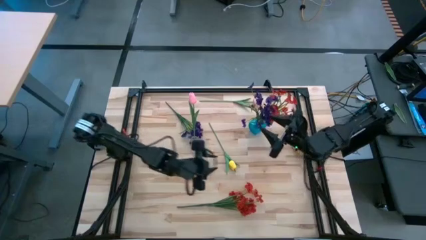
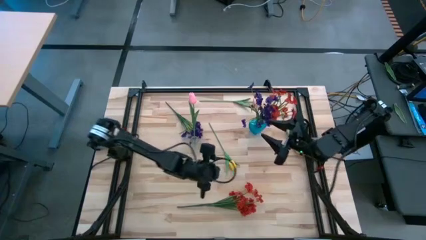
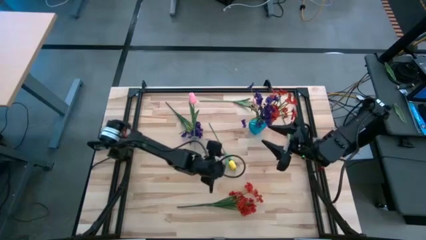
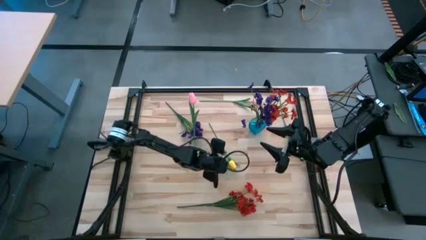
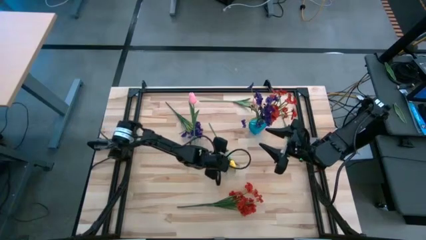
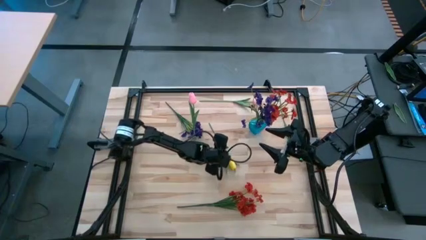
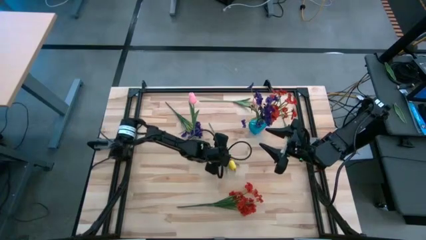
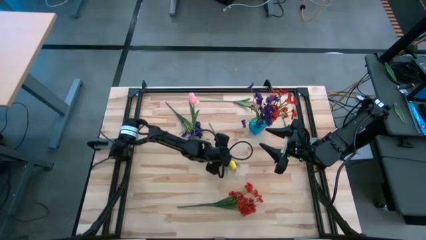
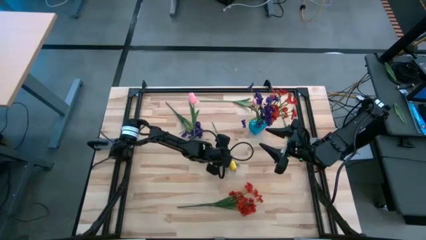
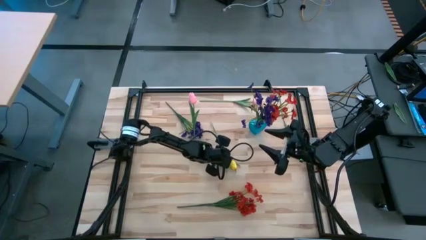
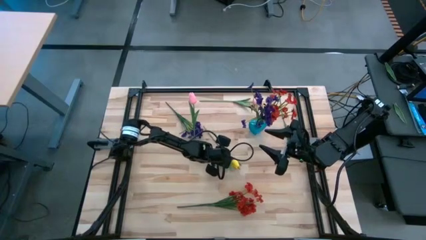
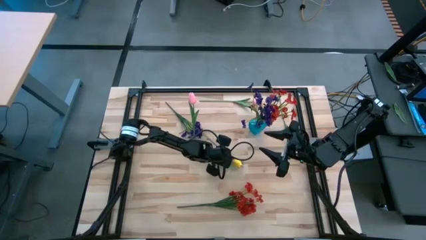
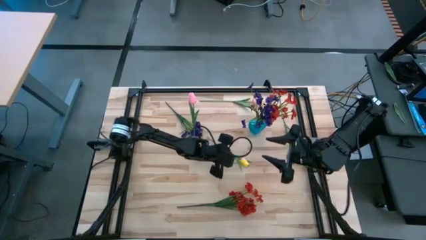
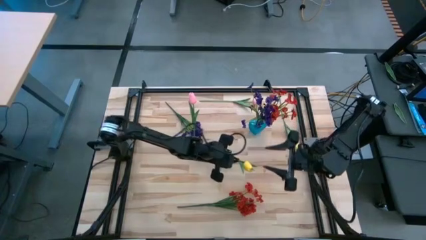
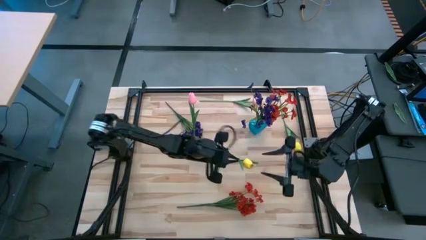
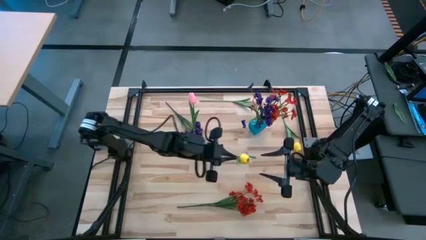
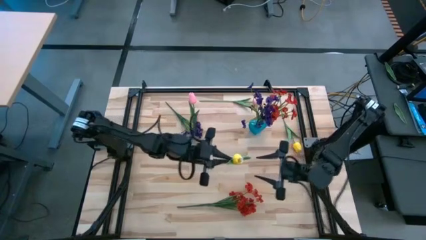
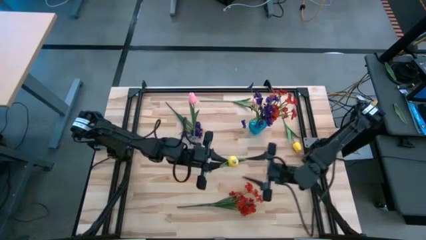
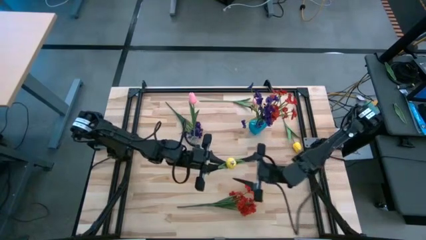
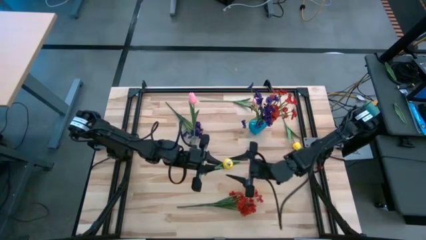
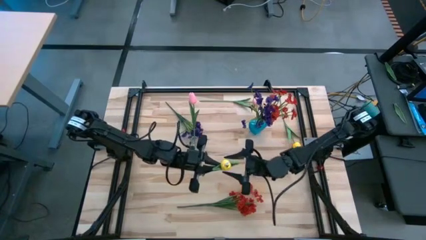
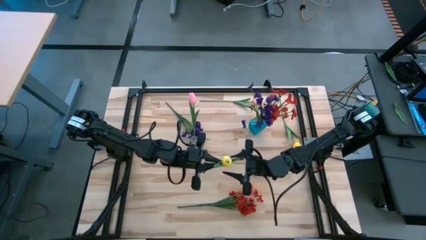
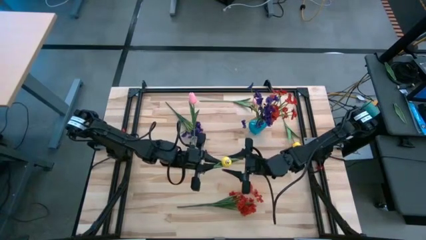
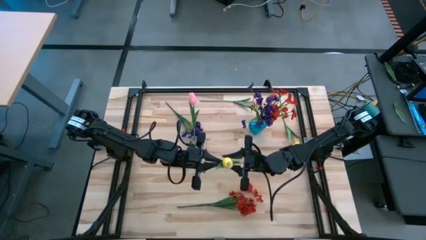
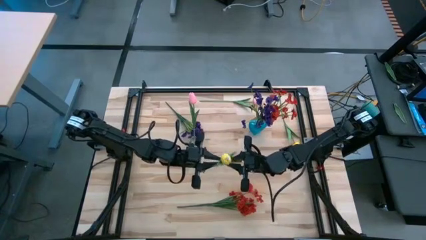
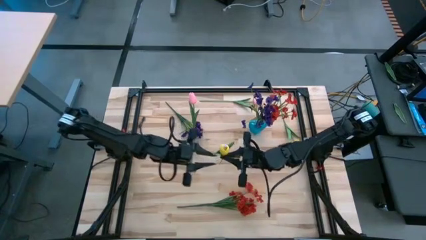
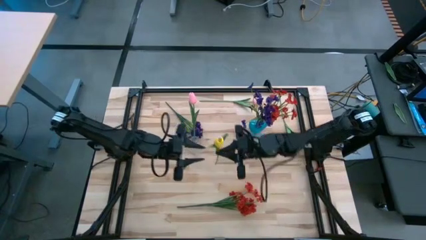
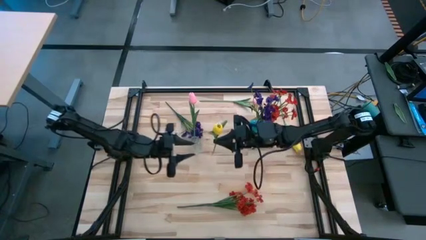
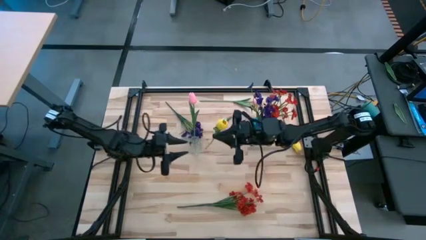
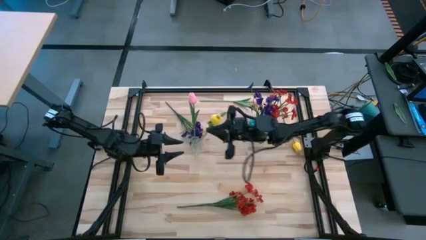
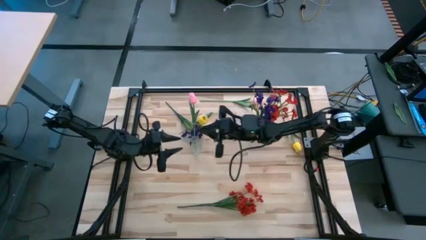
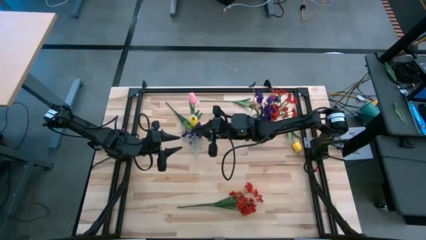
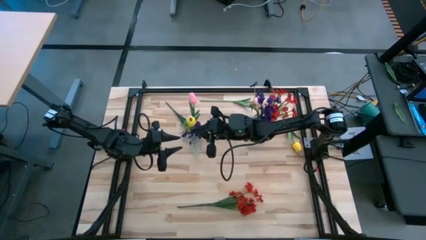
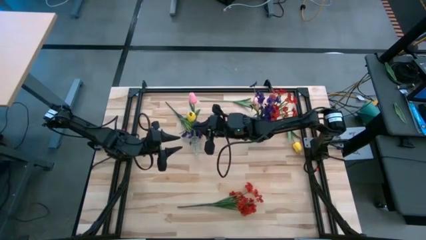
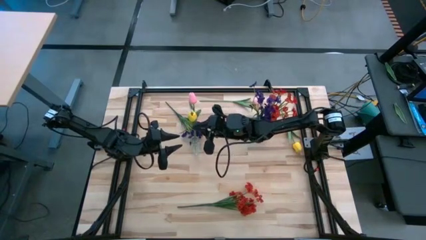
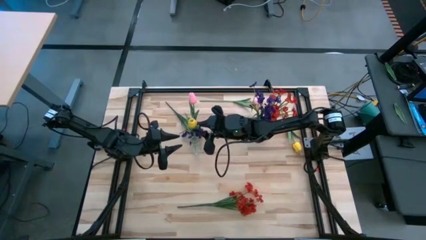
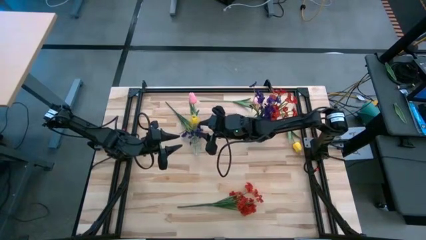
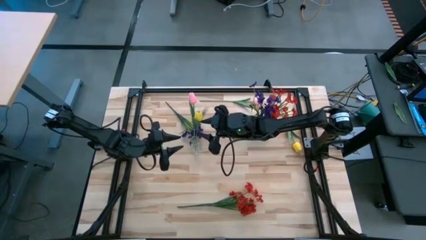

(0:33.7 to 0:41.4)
Task: Sort flowers into vase by color
Put the left yellow tulip into the transparent vase

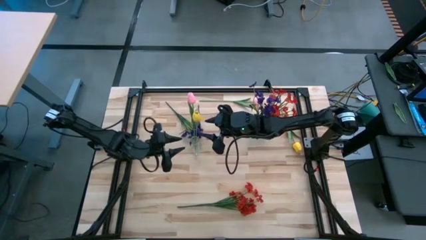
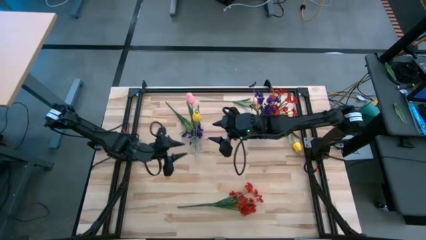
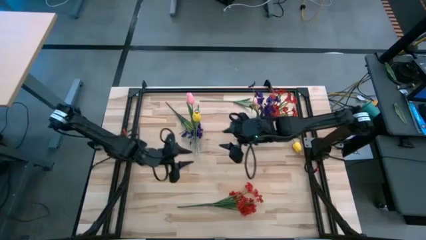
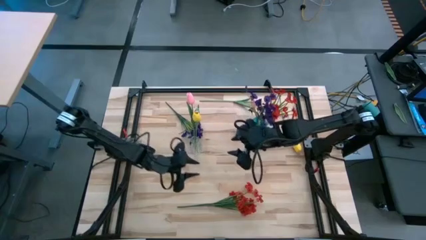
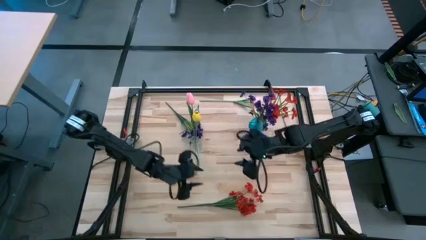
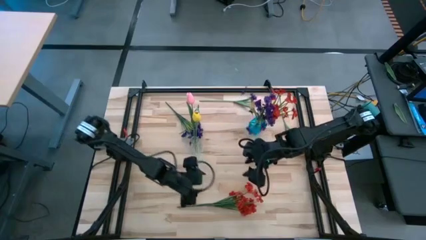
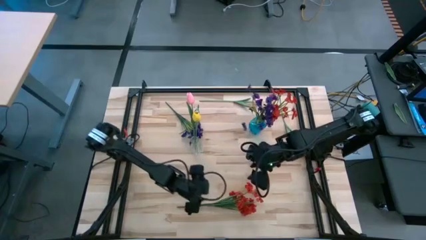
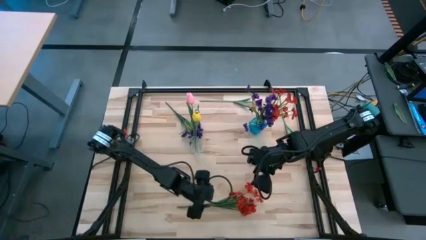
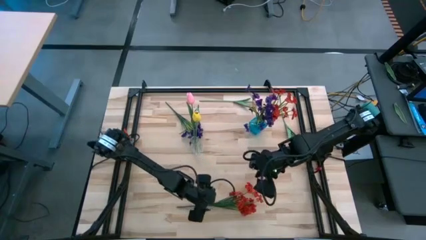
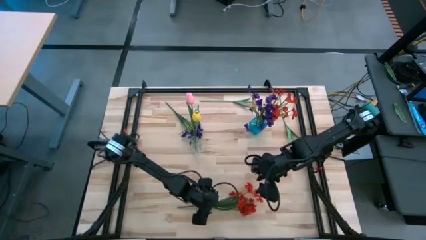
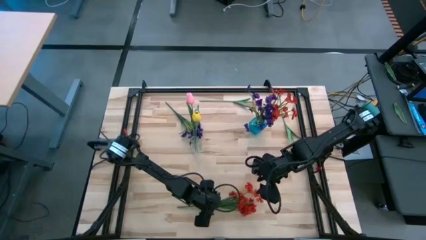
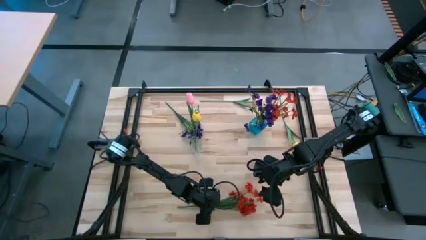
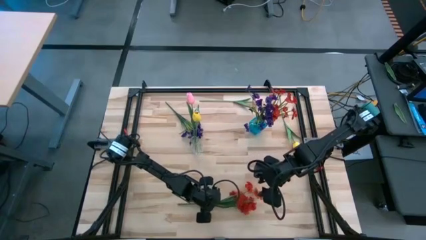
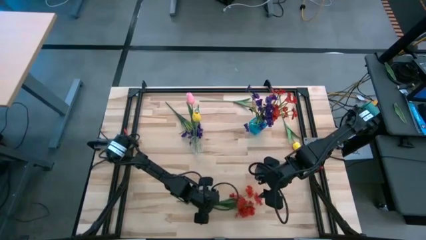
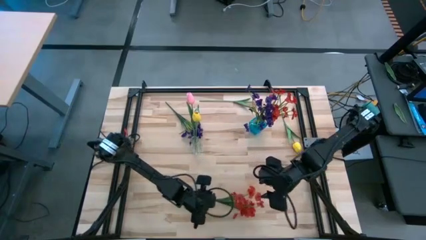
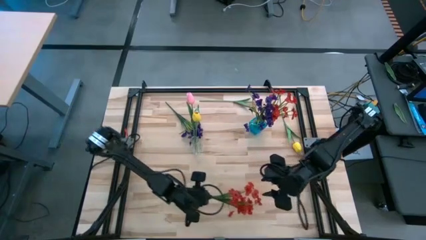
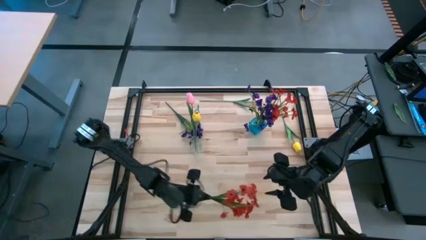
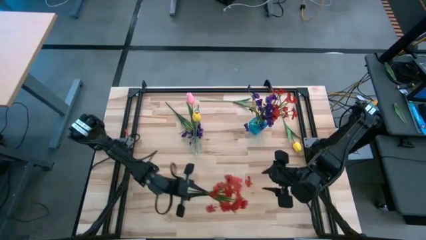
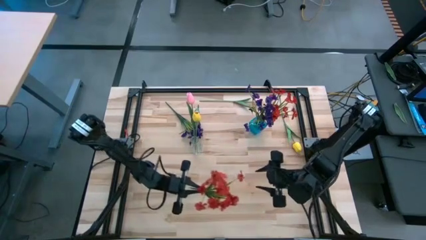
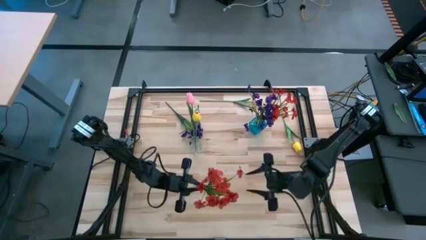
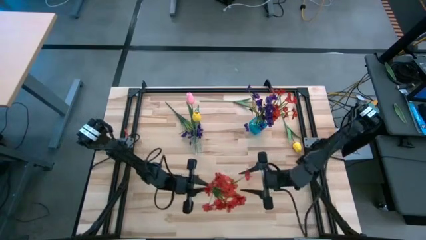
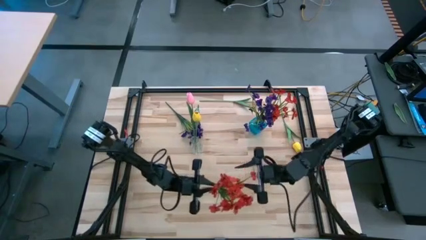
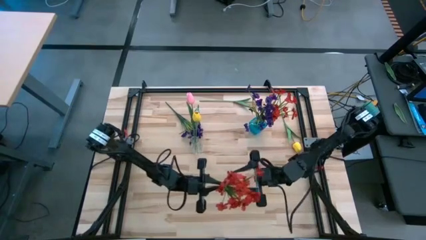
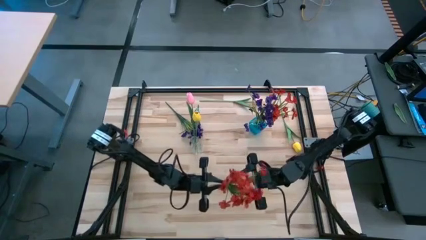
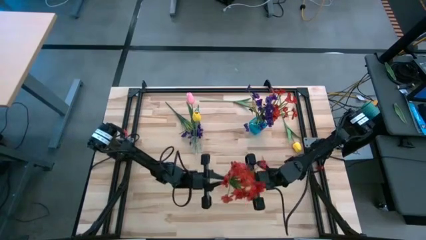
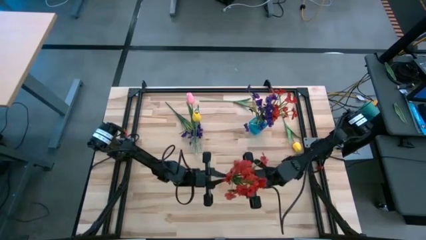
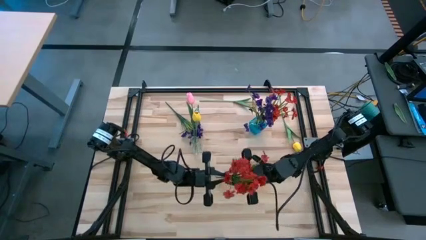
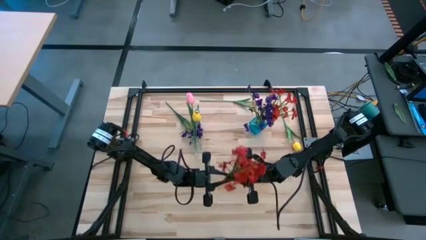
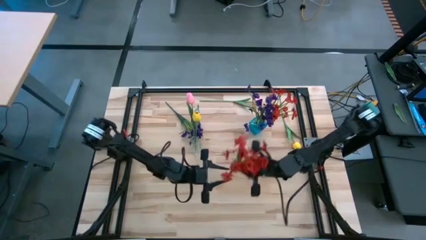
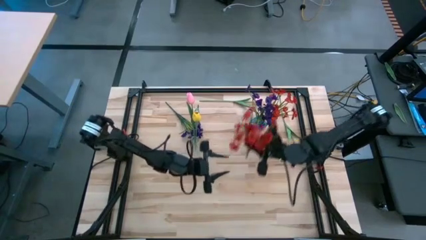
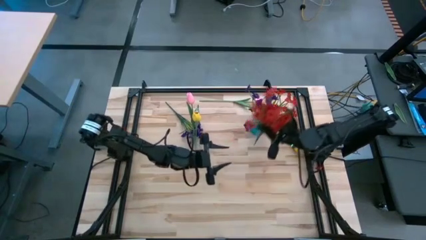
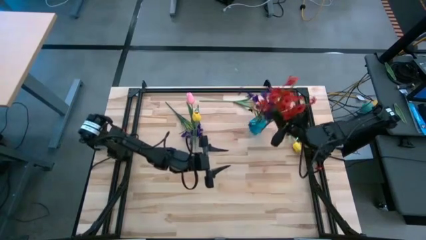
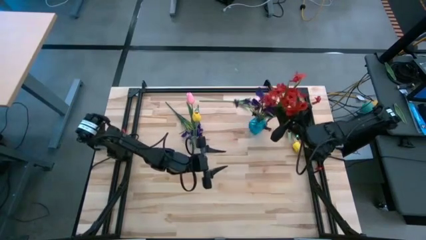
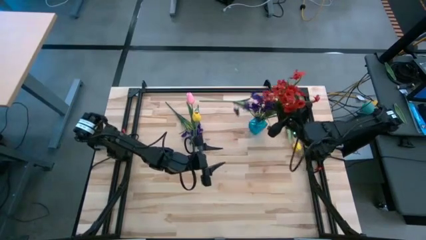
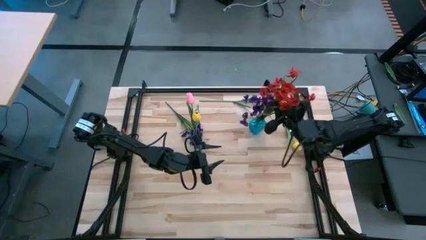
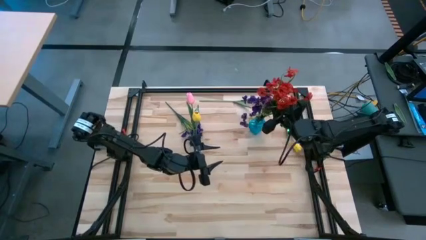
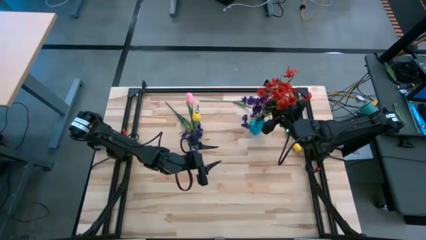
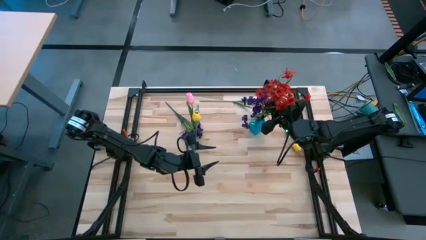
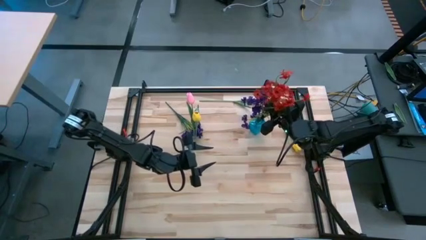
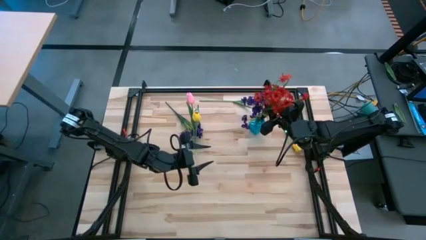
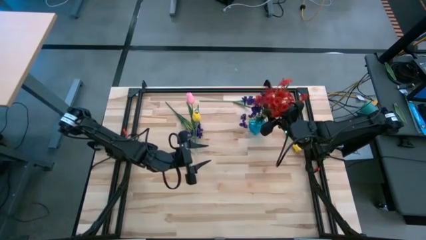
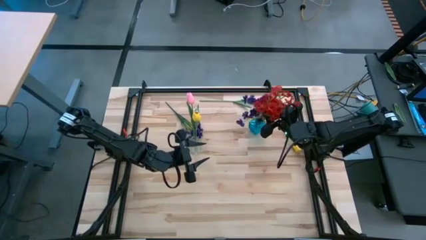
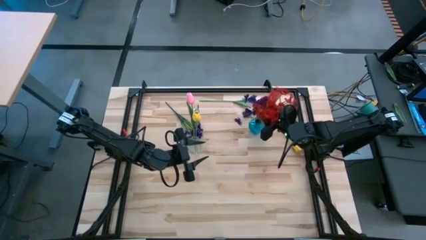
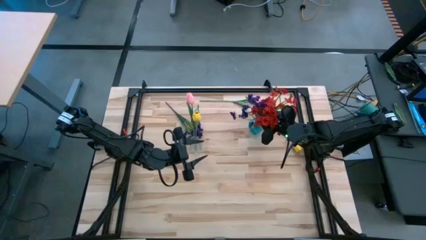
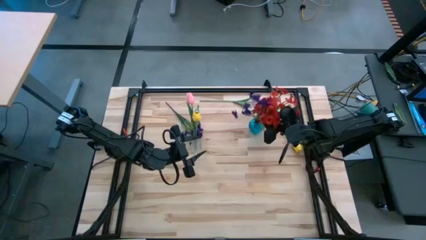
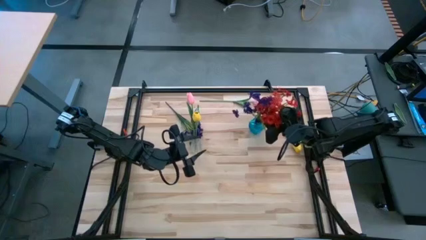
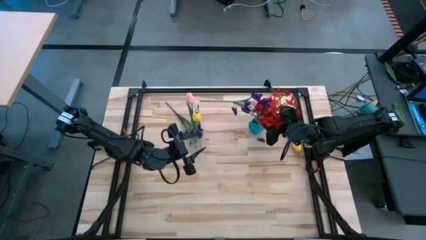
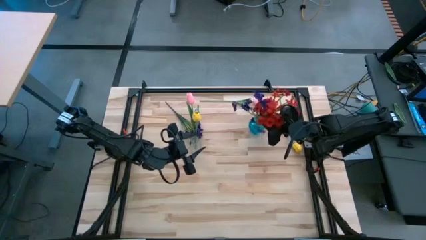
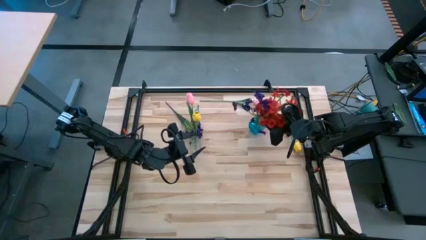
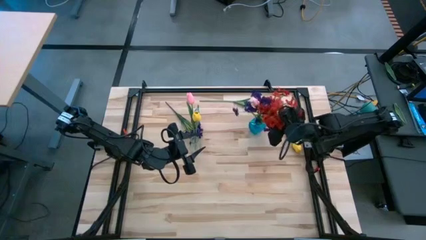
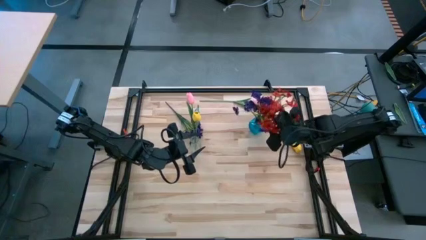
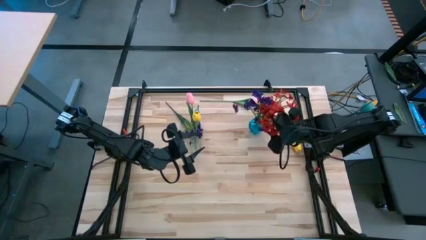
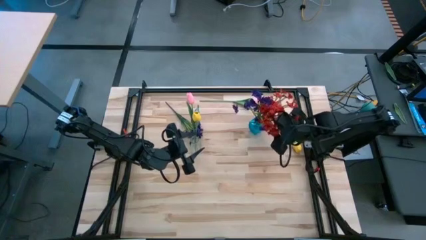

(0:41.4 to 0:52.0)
Put the red flower into the blue vase
